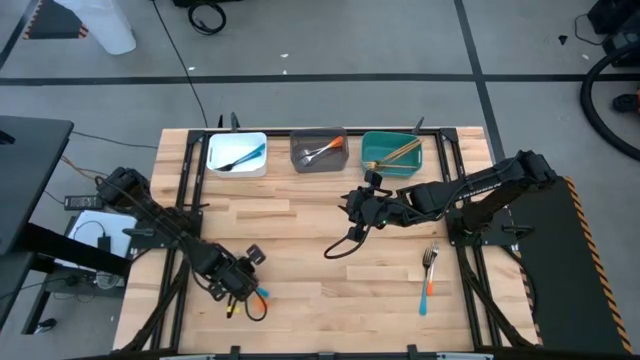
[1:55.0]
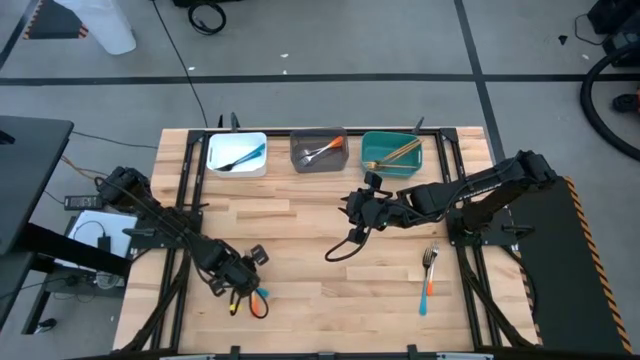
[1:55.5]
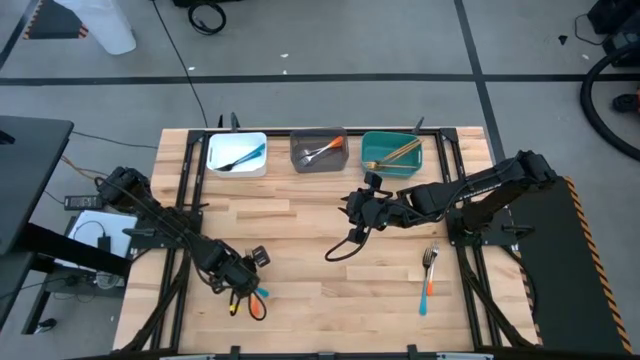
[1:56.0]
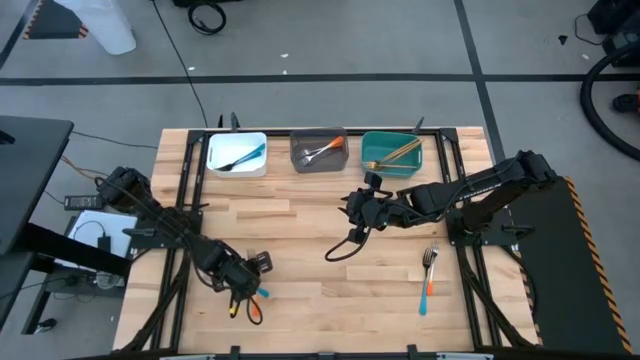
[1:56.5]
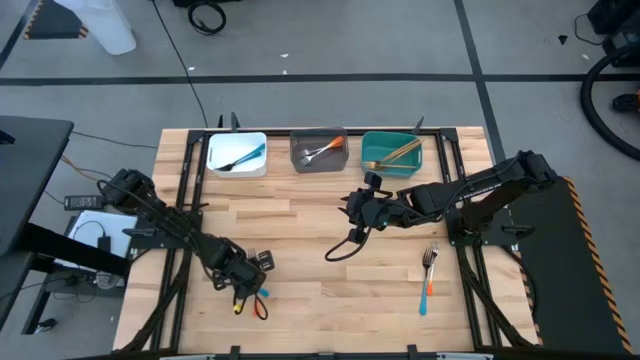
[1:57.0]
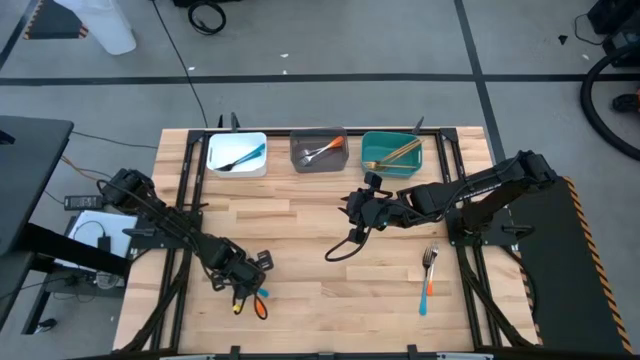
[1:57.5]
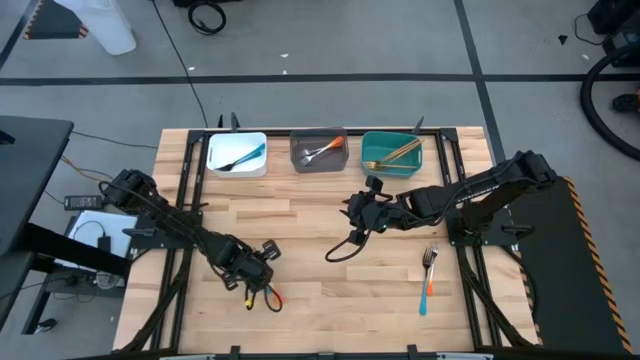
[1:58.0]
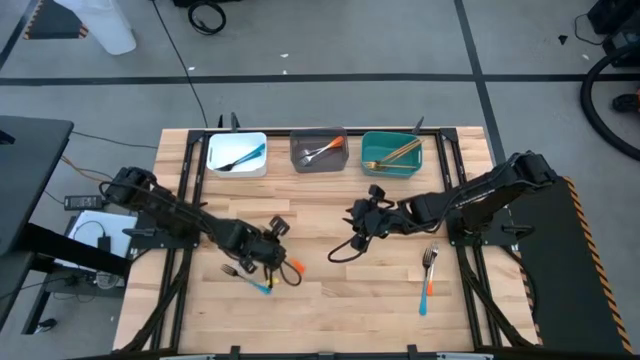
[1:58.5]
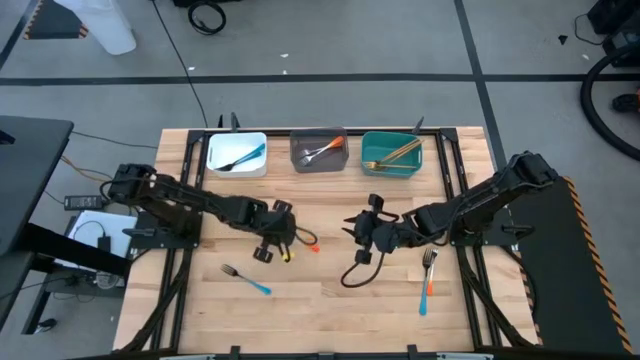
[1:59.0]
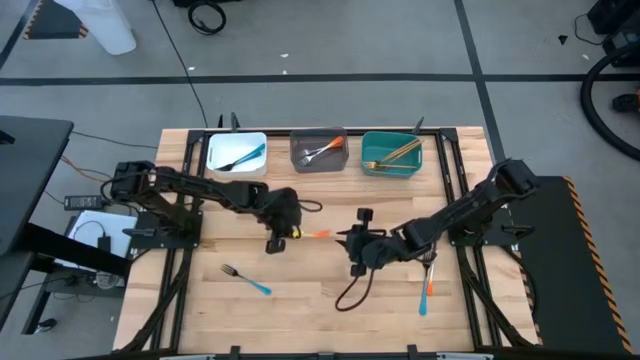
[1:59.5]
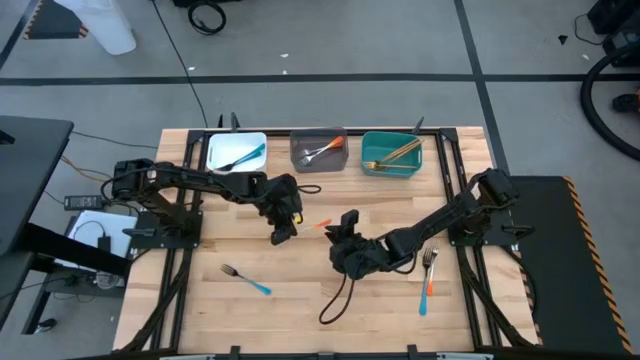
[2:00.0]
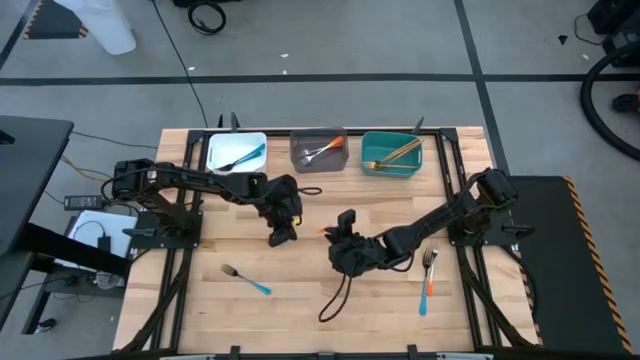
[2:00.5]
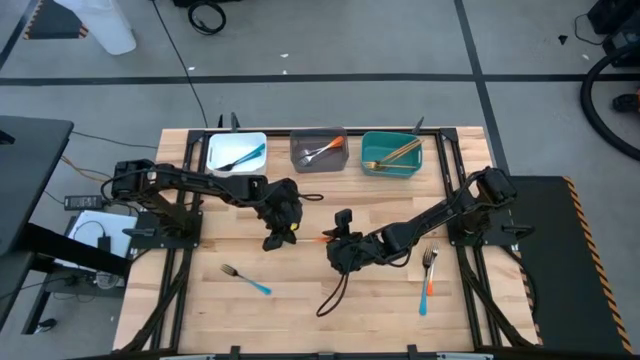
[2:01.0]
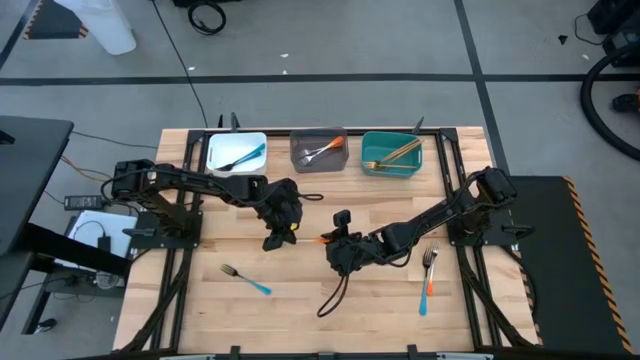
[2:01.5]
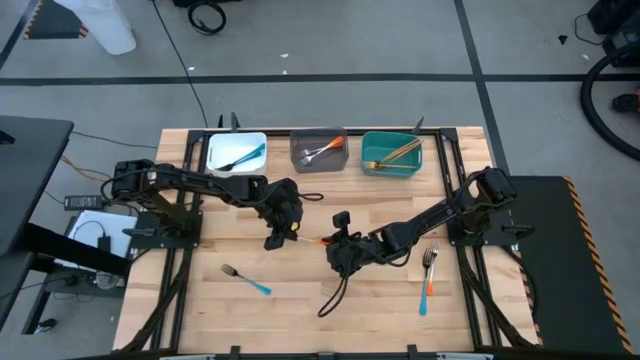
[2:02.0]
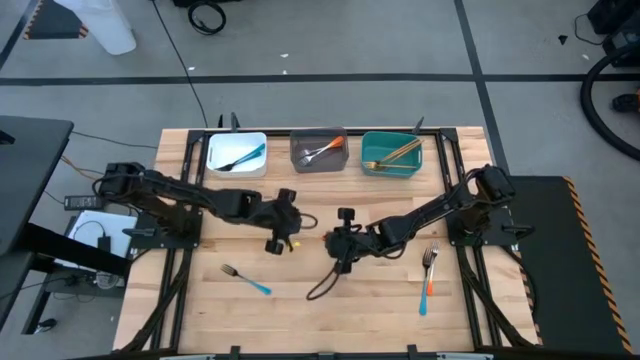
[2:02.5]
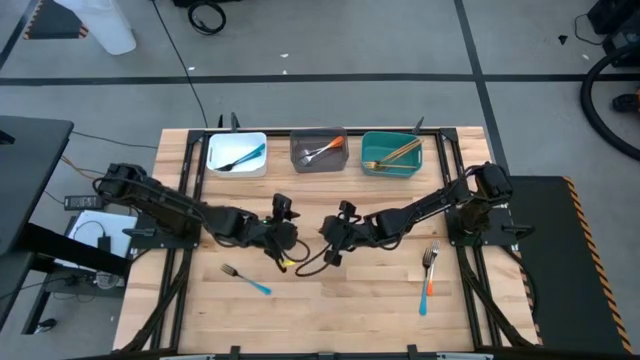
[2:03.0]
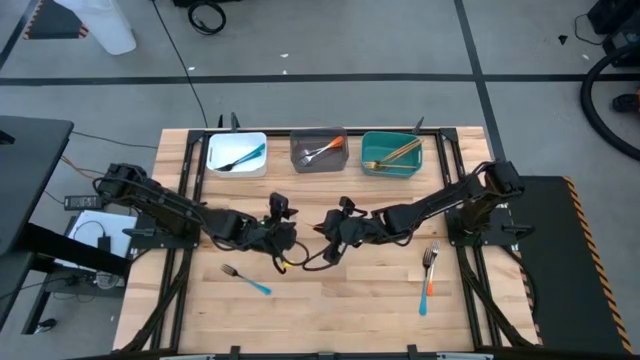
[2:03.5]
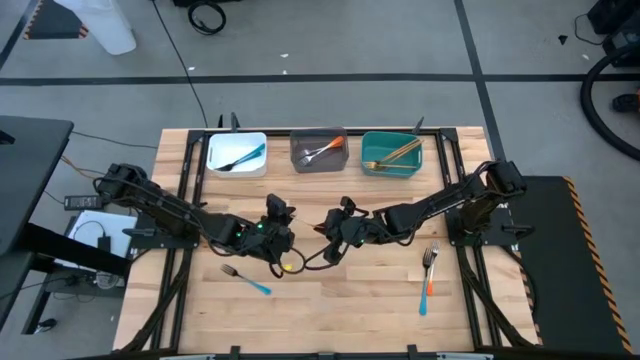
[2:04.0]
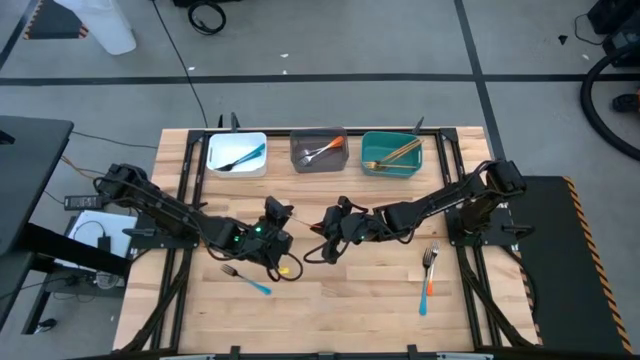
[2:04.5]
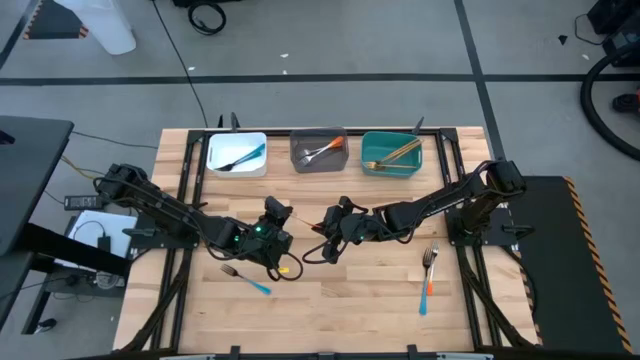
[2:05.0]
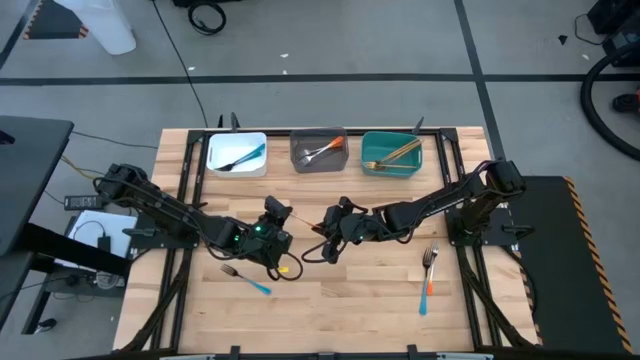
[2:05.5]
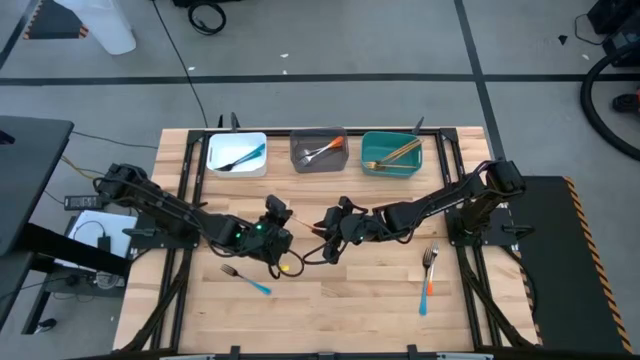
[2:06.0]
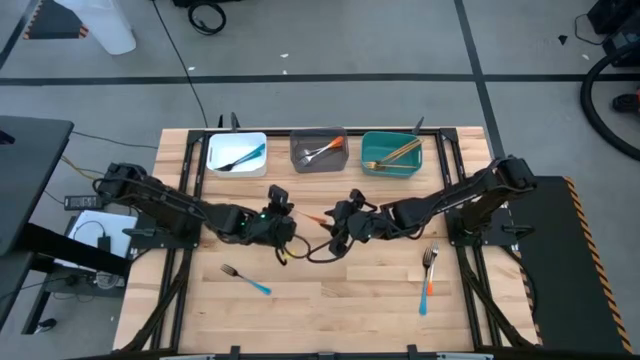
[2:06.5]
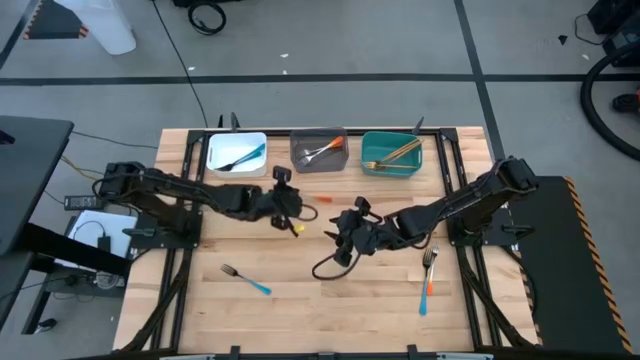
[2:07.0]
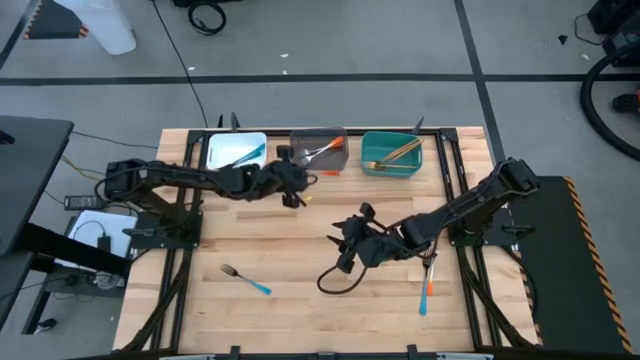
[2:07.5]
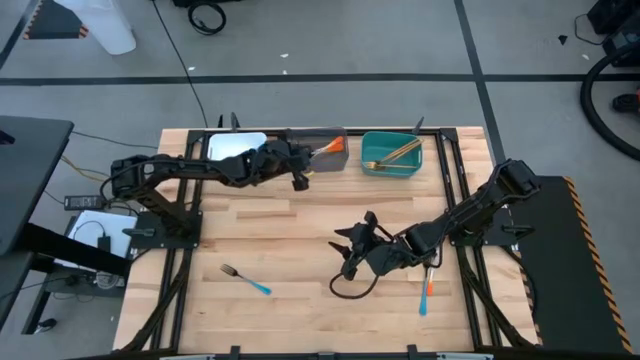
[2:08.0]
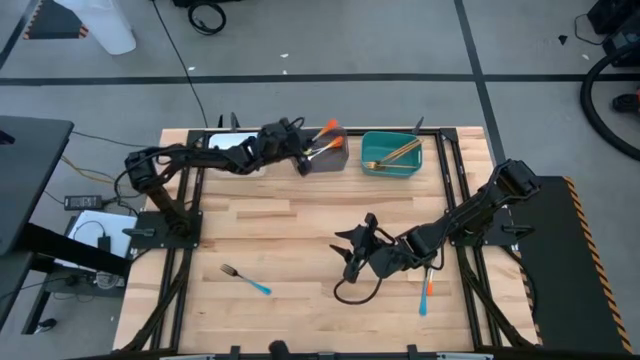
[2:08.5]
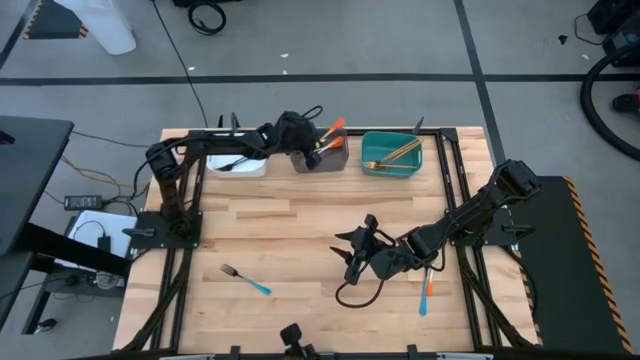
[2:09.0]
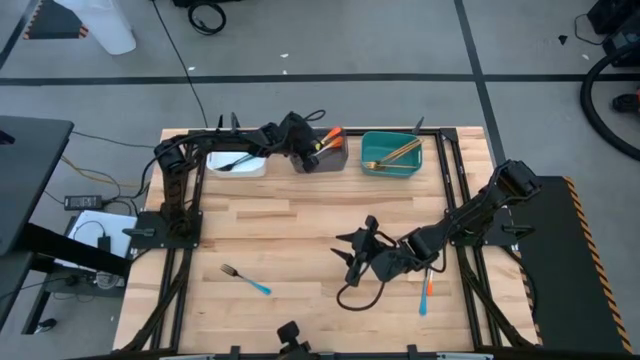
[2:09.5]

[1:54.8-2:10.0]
Task: Sort silverware by color (type)
Put the orange fork into the black bin

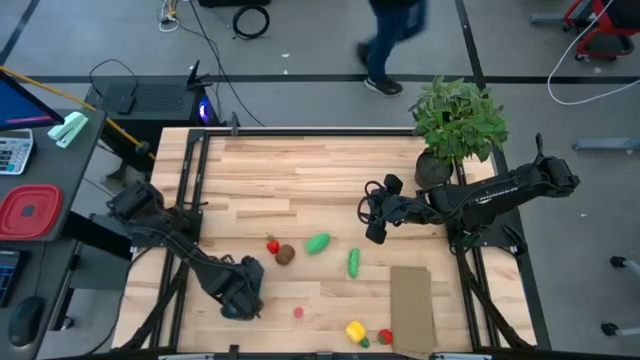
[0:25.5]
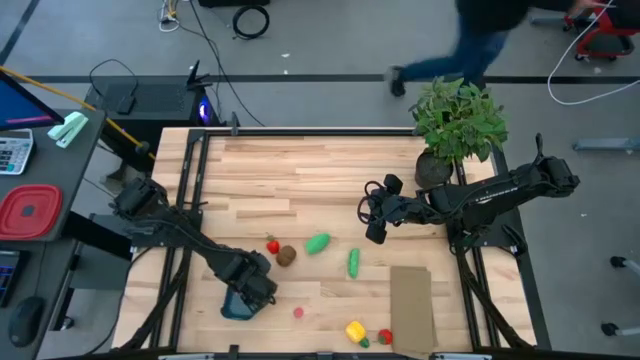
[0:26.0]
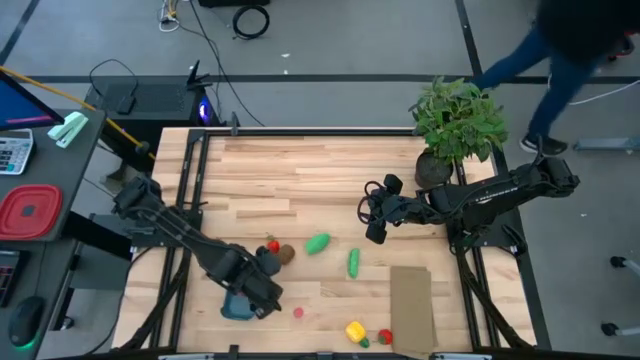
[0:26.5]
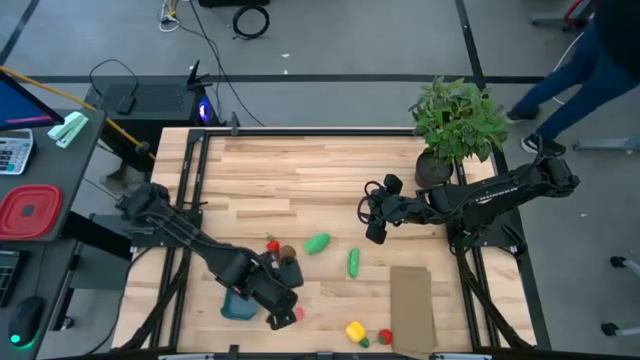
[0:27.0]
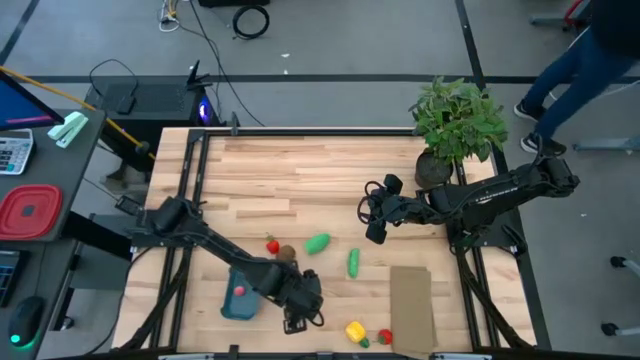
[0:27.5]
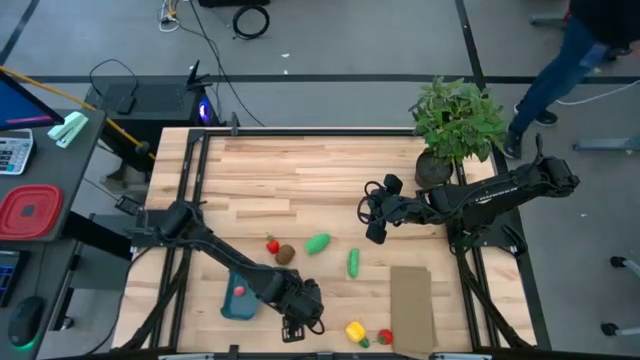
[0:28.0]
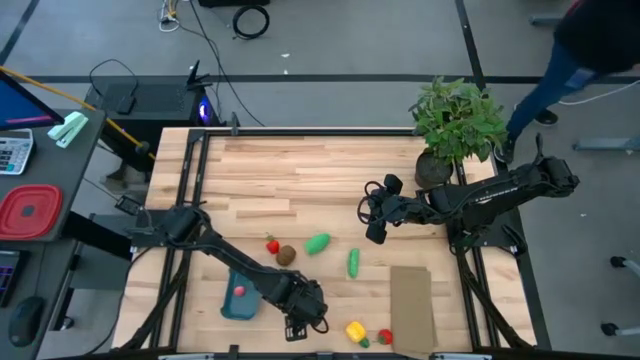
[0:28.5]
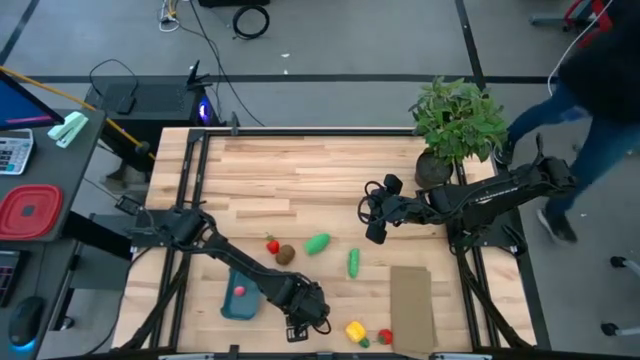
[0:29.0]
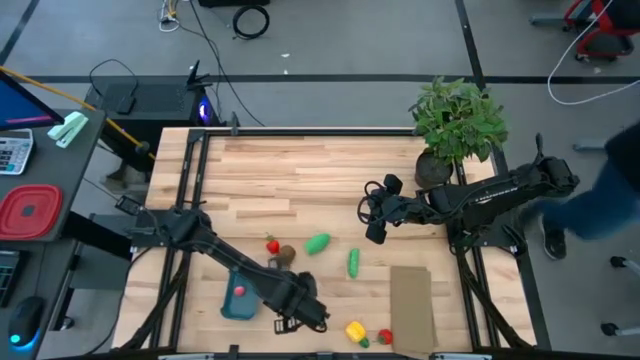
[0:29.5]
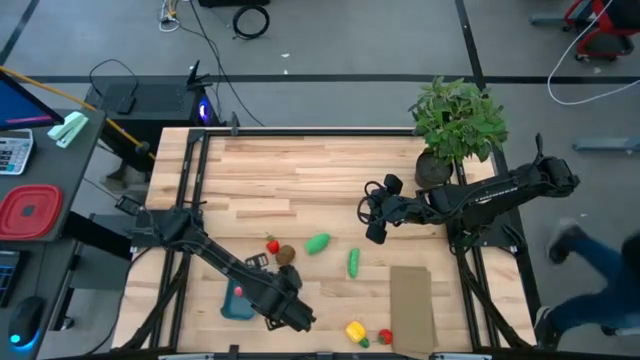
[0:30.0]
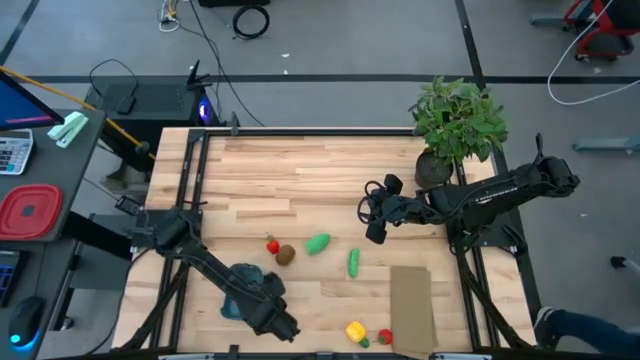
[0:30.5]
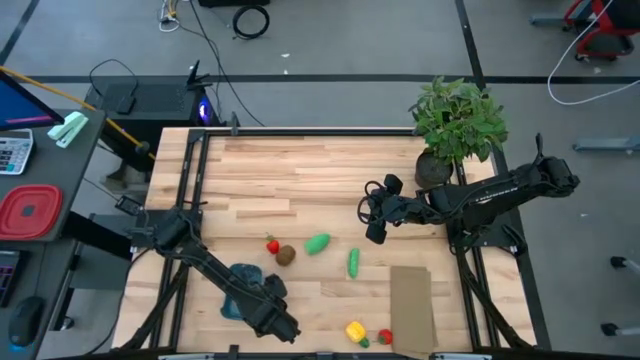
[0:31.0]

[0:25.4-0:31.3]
Task: Pick and placing Produce into tupperware
Put the pink peach into the blue bin
